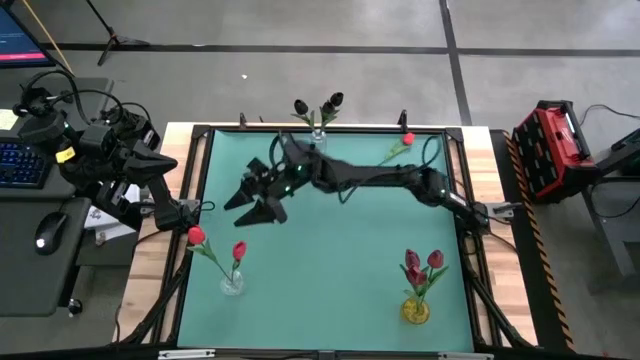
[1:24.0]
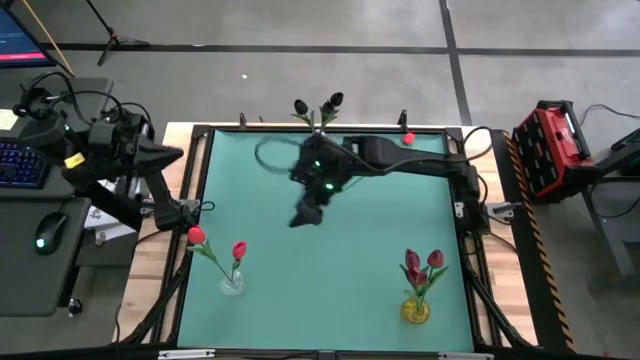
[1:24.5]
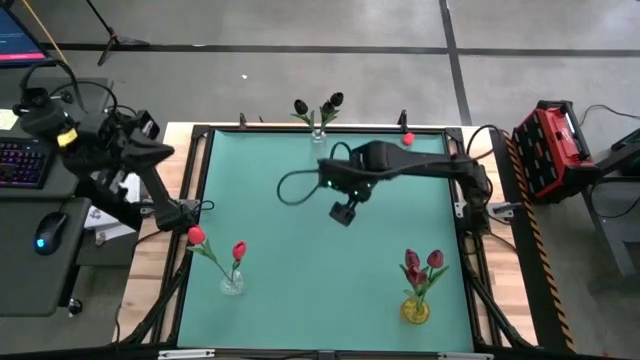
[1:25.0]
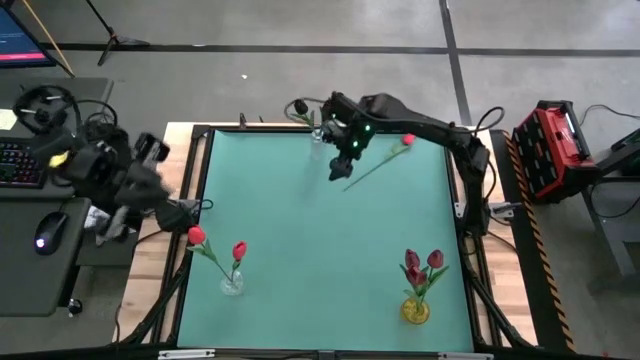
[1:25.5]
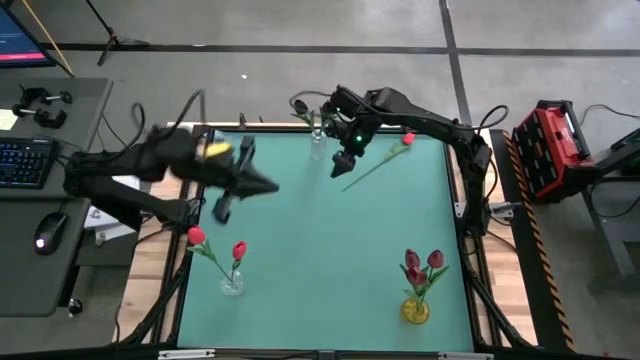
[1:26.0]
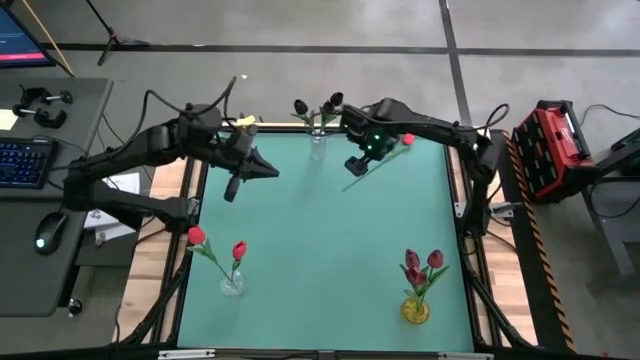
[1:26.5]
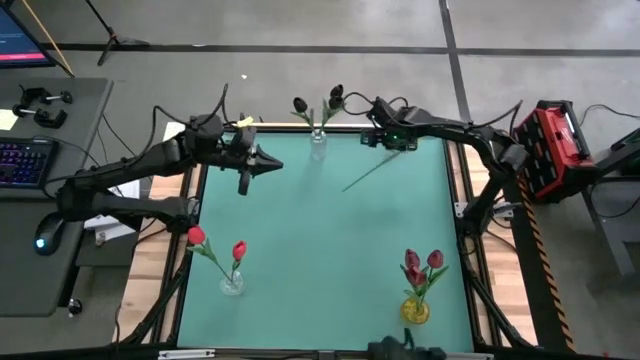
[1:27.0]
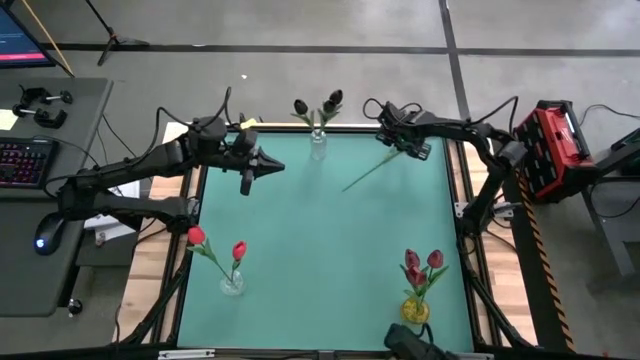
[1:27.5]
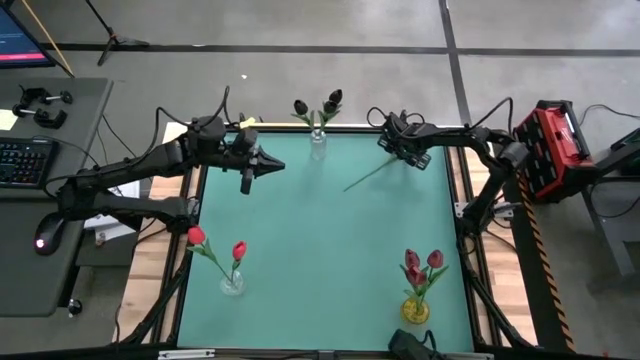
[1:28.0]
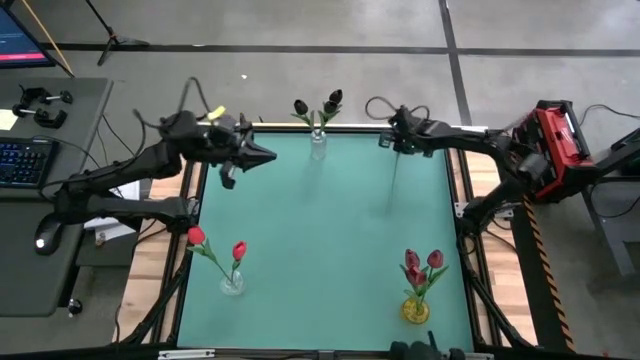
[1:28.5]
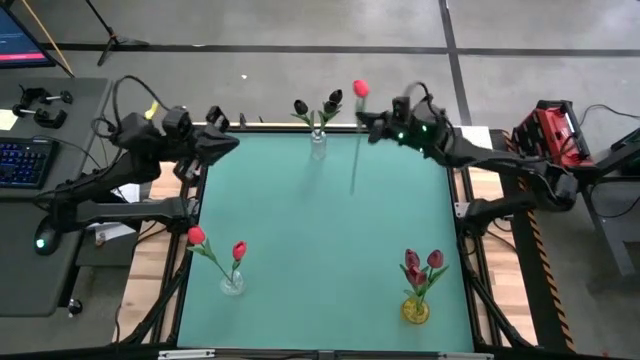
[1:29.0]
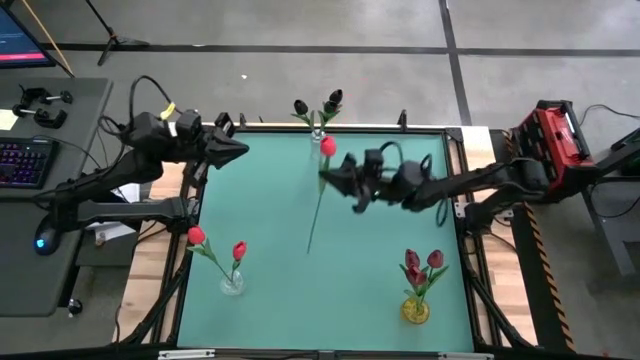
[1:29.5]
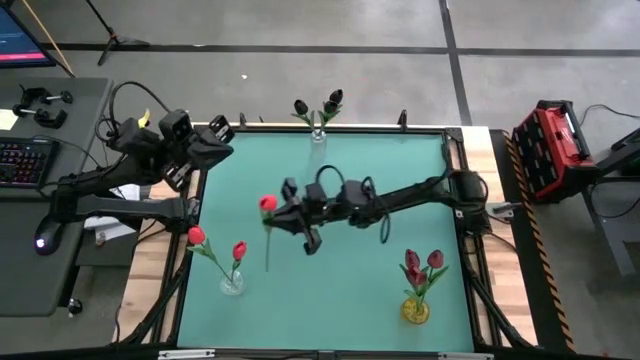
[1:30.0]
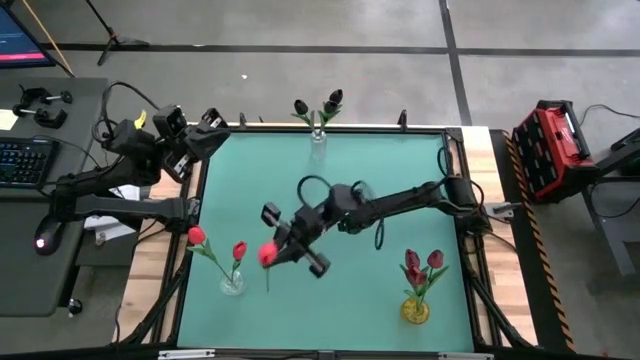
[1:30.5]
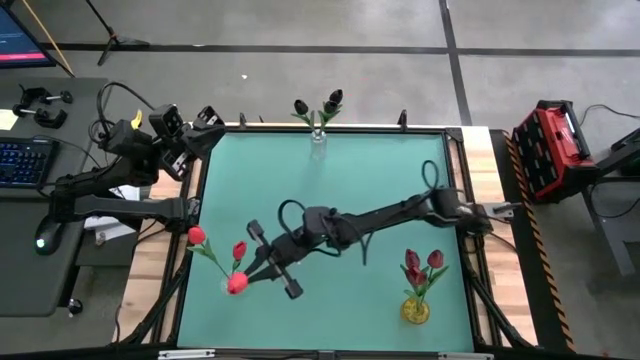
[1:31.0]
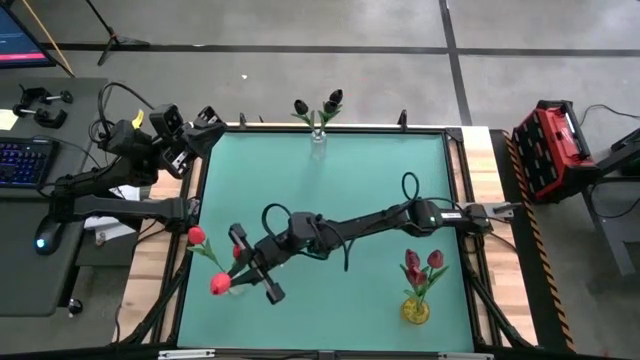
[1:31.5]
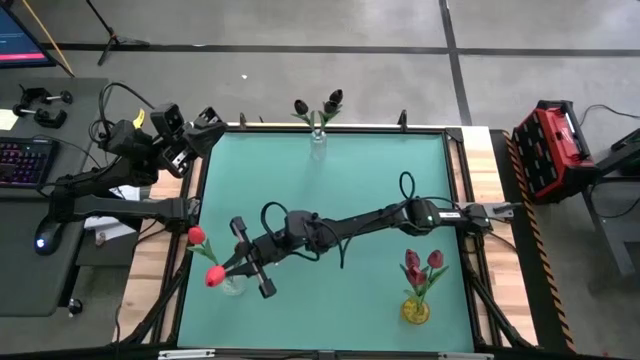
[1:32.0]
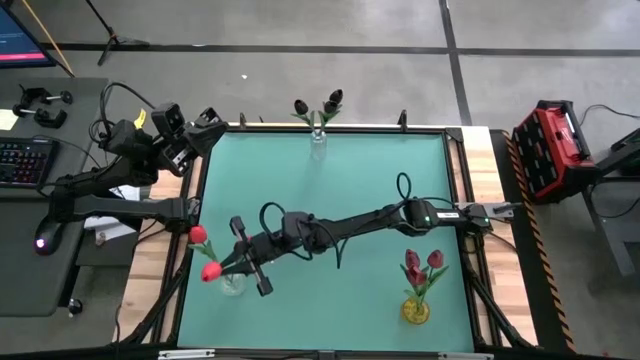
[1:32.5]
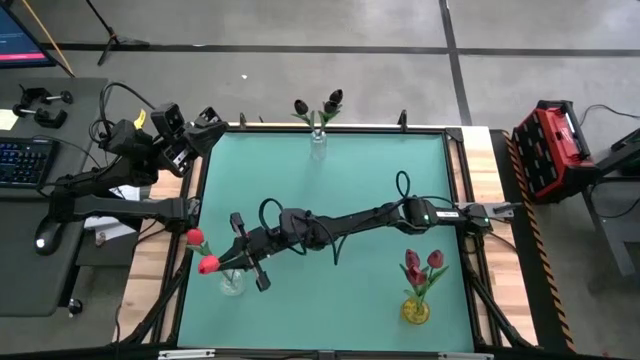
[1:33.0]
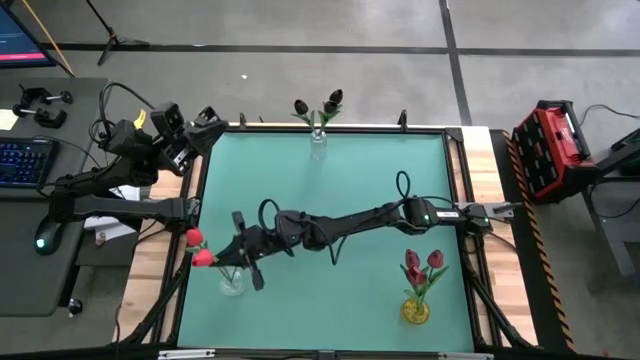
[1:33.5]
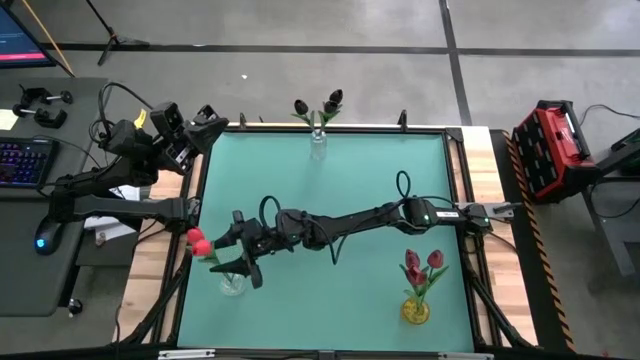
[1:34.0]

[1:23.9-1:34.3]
Task: Sort flowers into vase by color
Put the red tulip into the bottom transparent vase

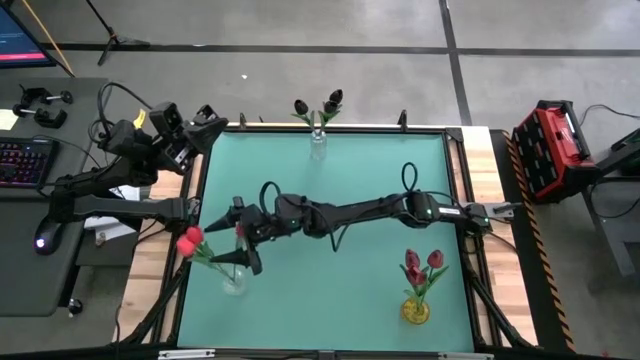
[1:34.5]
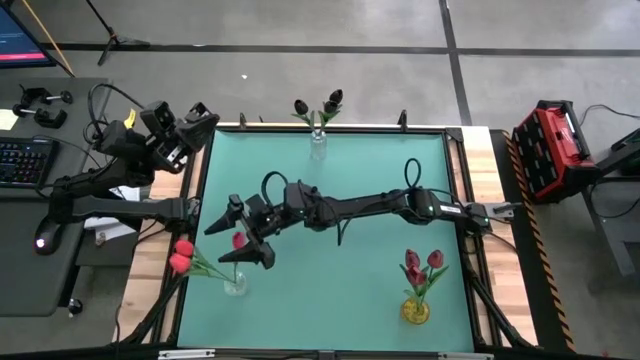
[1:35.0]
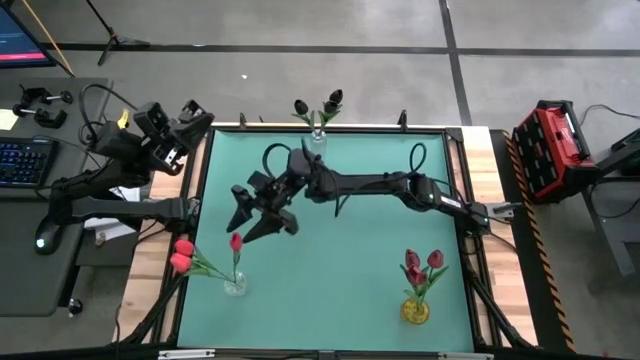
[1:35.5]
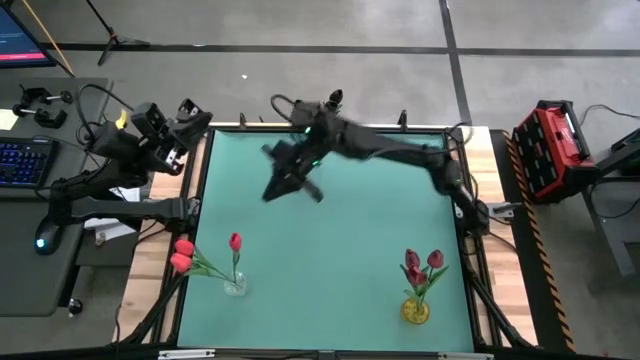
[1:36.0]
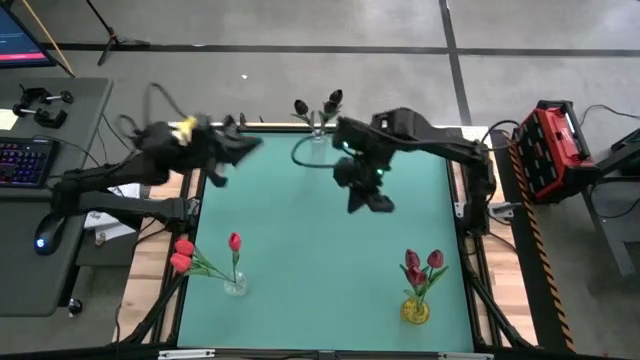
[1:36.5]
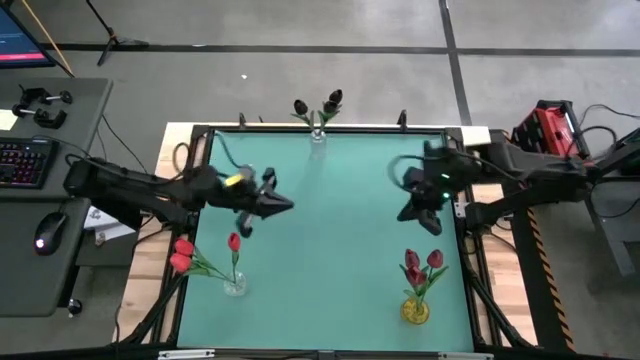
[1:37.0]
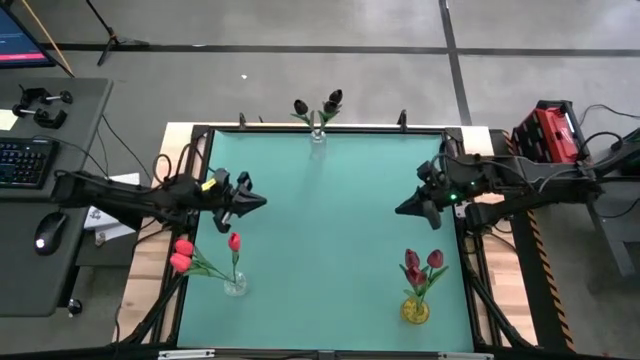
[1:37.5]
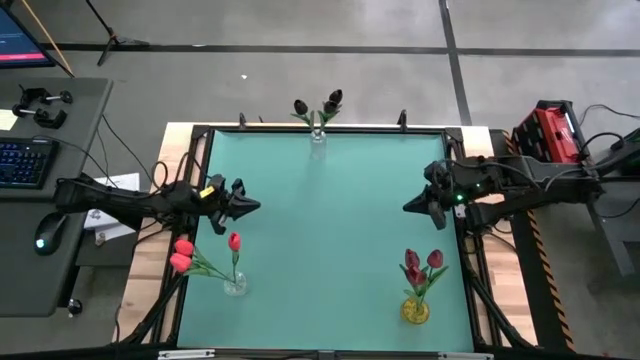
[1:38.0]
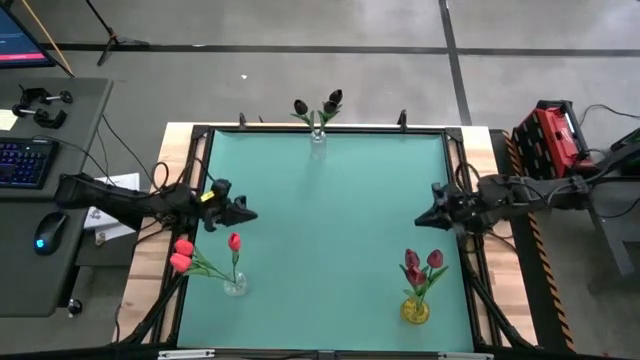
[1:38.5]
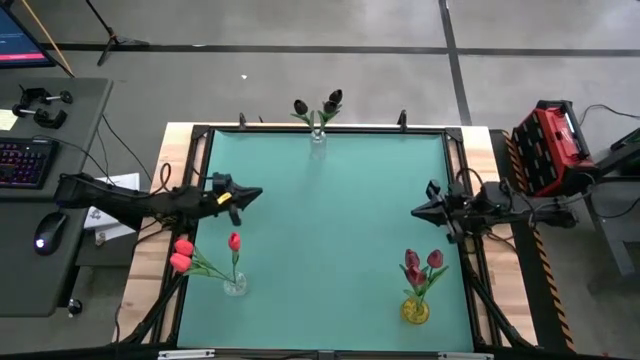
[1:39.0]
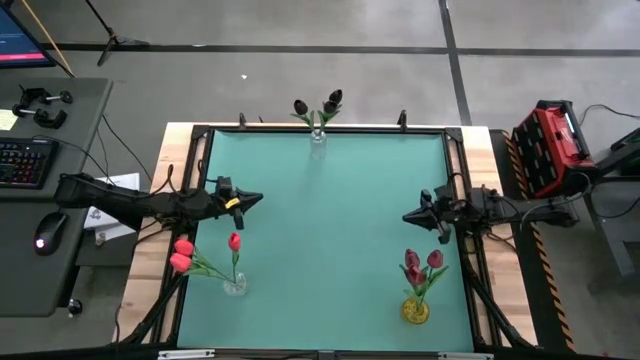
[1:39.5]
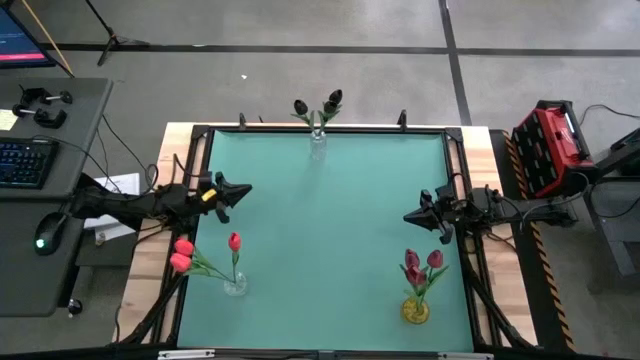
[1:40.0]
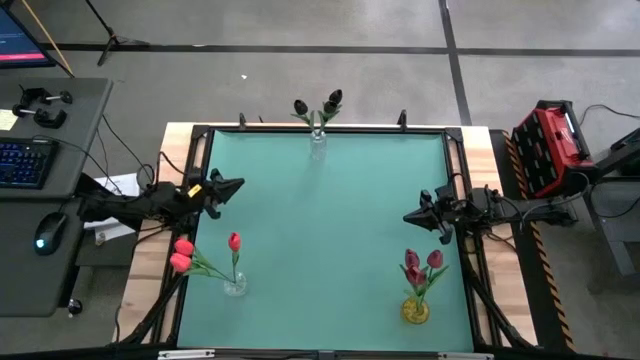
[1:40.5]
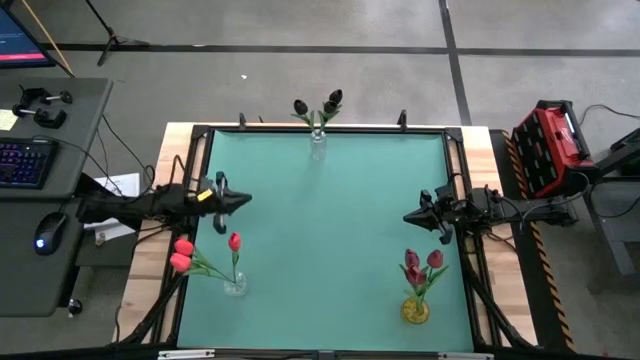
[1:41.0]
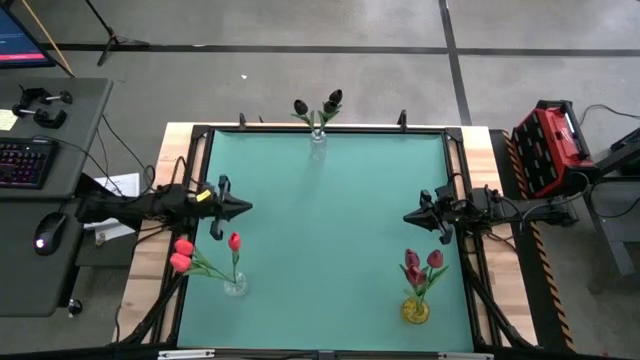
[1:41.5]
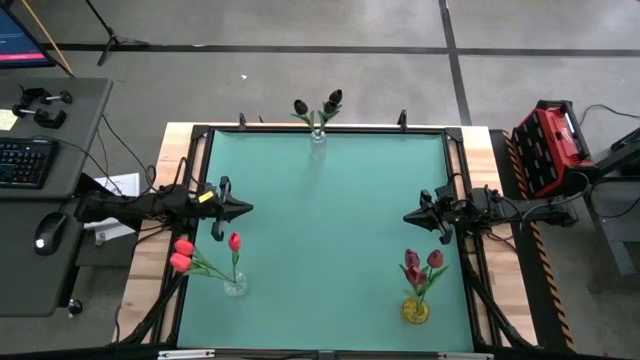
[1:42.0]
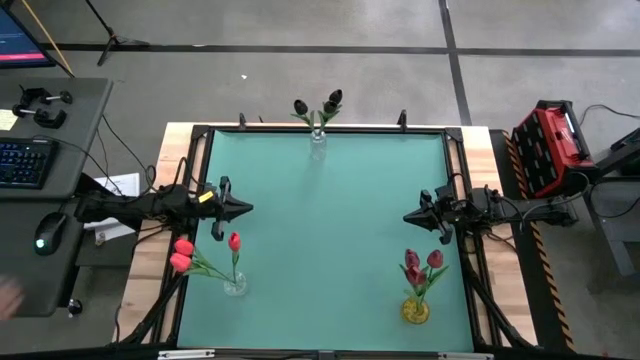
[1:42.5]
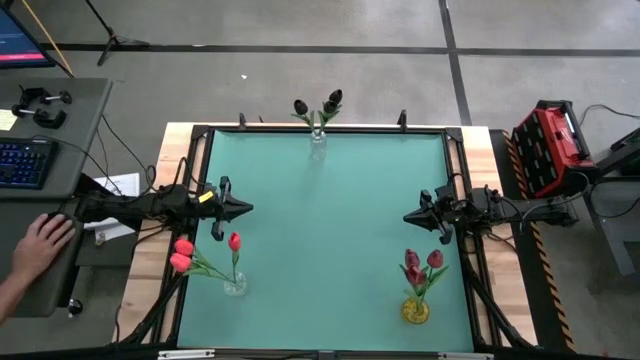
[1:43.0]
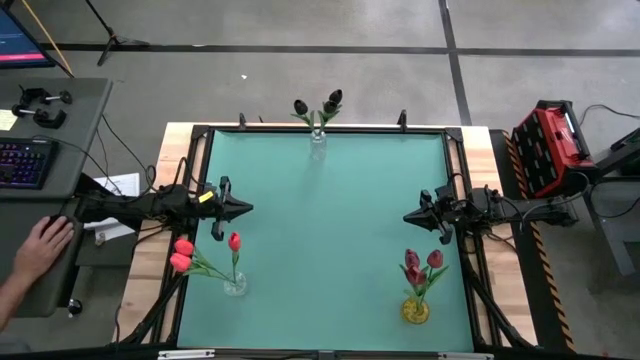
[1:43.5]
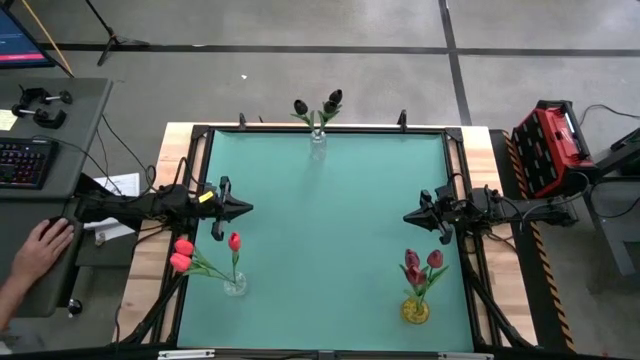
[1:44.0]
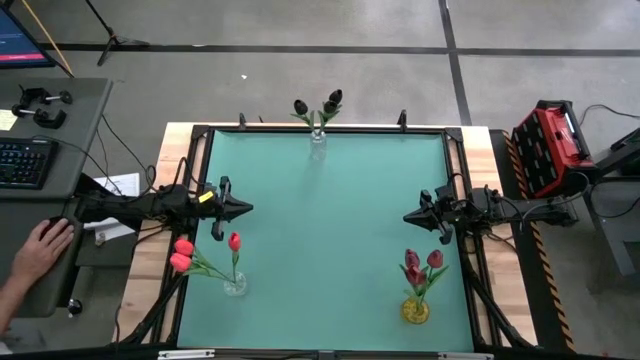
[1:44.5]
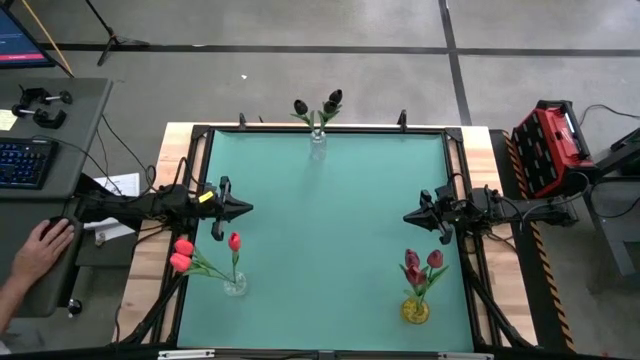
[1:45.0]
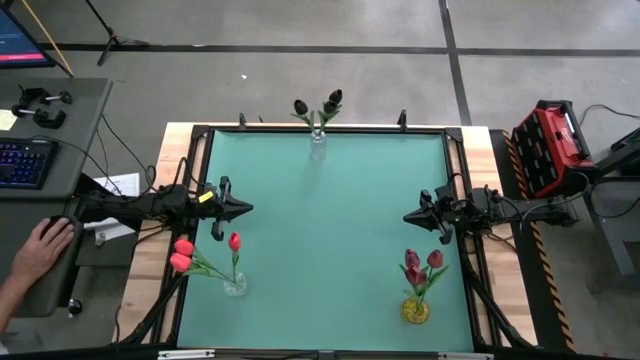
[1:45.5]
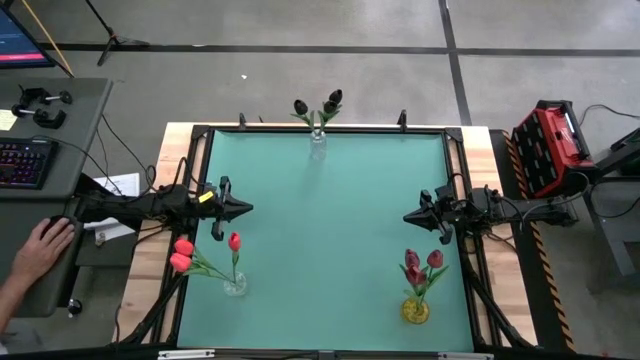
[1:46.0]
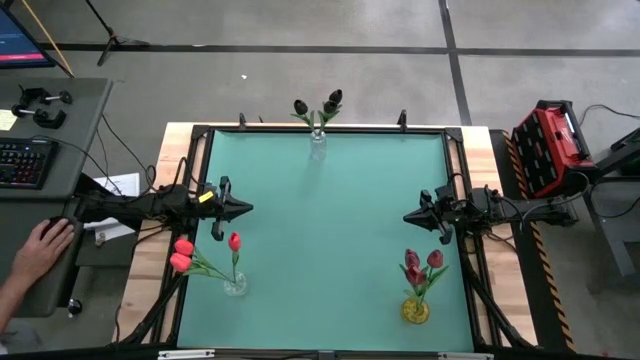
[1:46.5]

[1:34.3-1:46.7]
Return to Home Position
